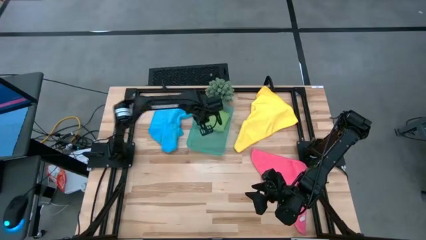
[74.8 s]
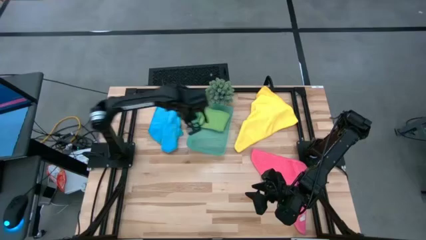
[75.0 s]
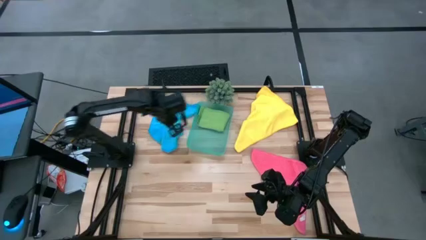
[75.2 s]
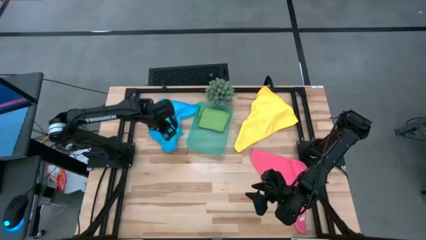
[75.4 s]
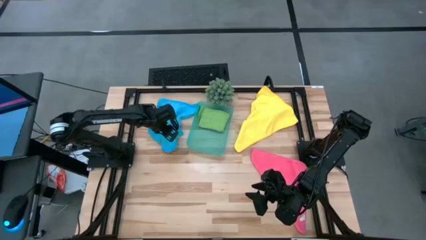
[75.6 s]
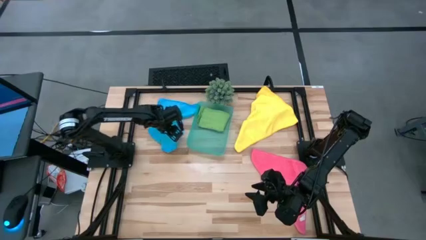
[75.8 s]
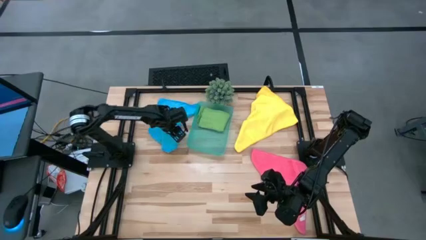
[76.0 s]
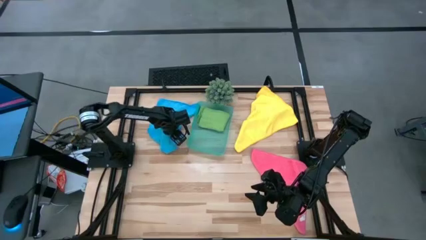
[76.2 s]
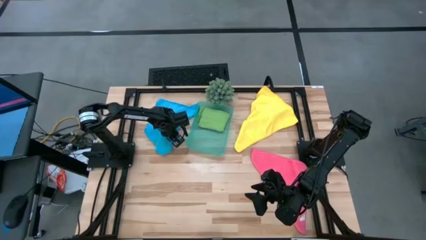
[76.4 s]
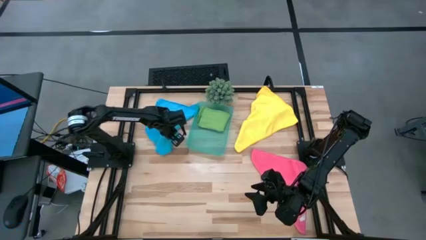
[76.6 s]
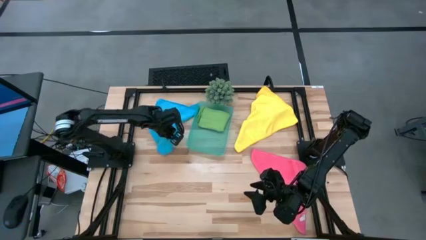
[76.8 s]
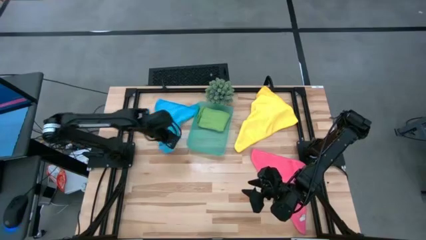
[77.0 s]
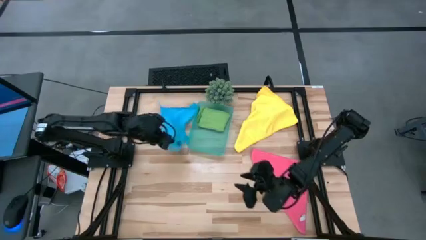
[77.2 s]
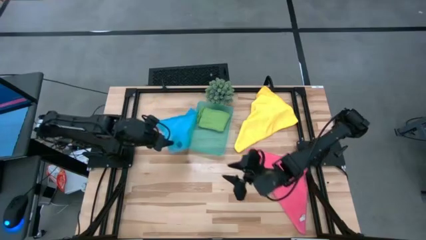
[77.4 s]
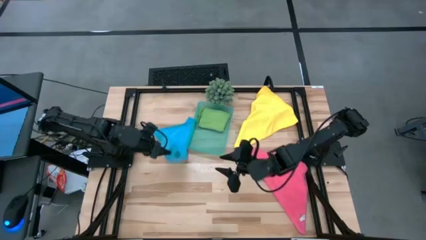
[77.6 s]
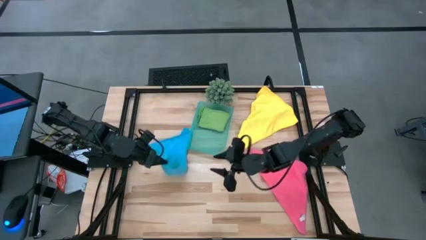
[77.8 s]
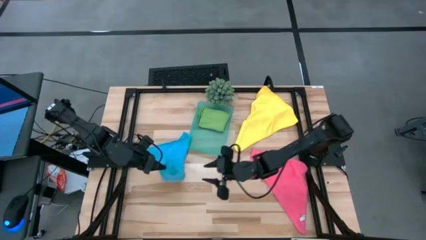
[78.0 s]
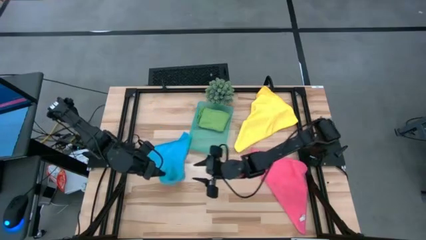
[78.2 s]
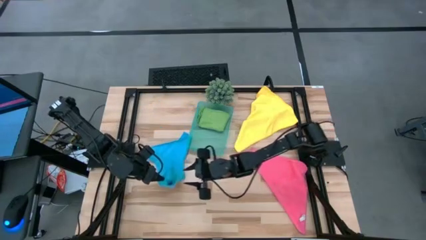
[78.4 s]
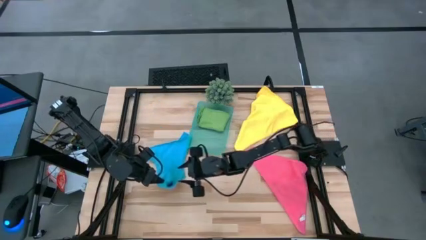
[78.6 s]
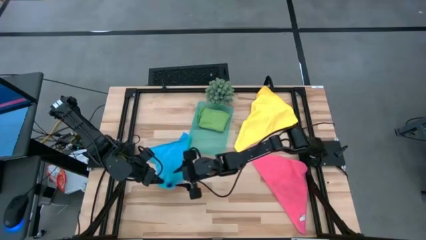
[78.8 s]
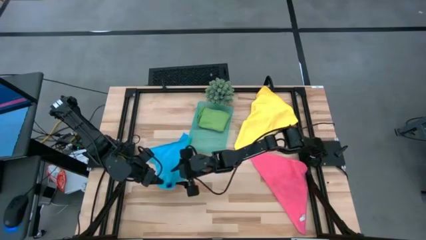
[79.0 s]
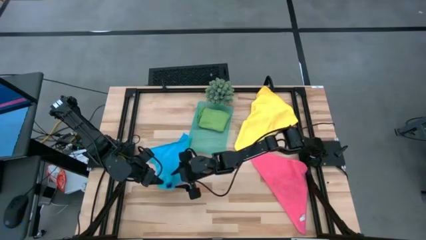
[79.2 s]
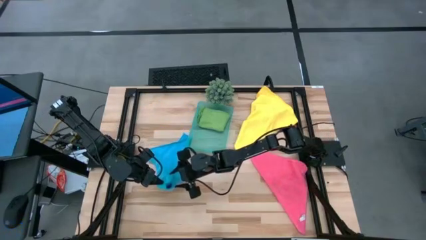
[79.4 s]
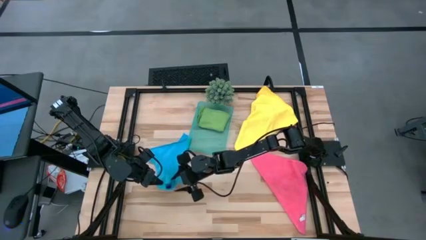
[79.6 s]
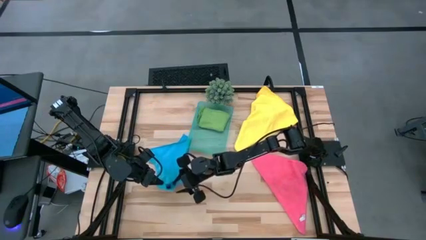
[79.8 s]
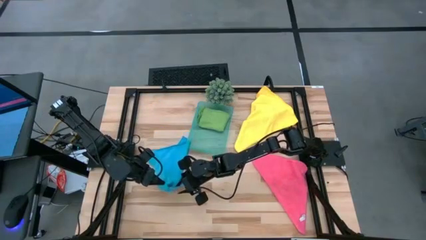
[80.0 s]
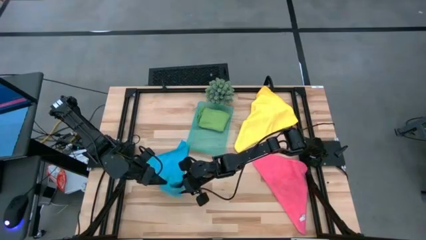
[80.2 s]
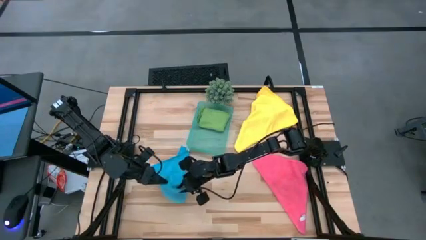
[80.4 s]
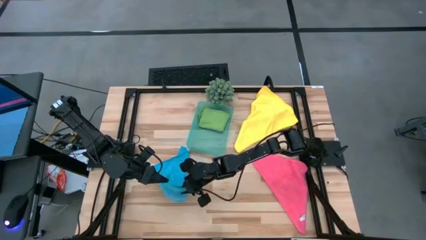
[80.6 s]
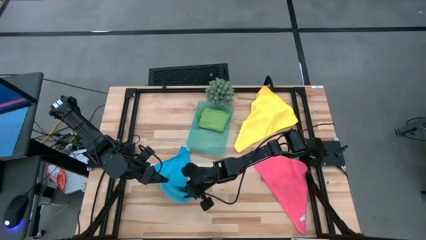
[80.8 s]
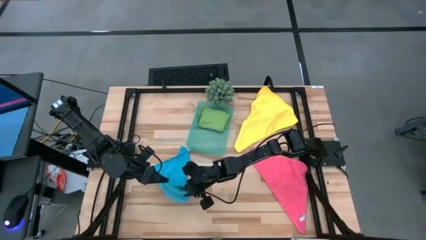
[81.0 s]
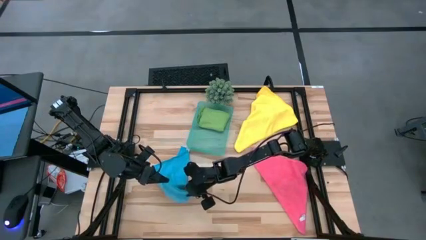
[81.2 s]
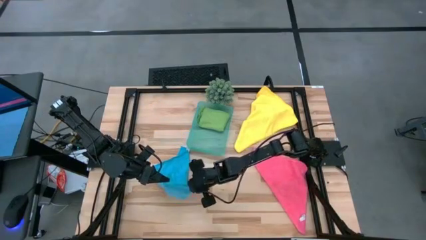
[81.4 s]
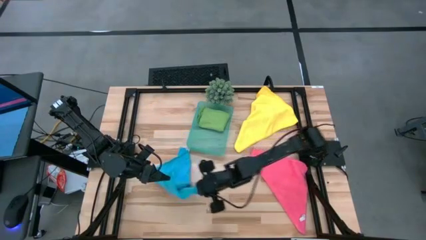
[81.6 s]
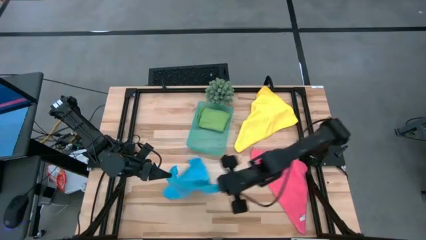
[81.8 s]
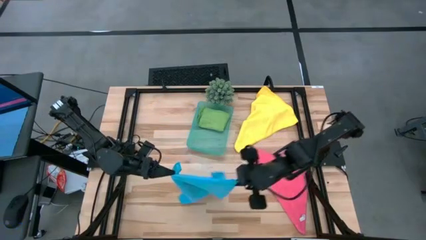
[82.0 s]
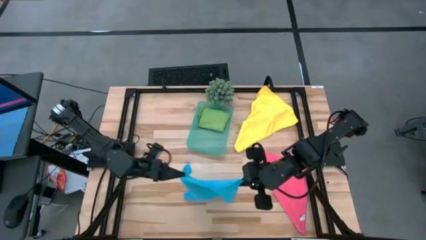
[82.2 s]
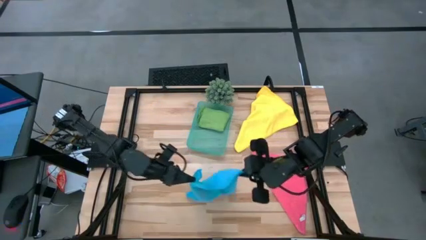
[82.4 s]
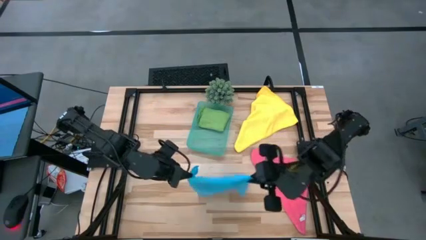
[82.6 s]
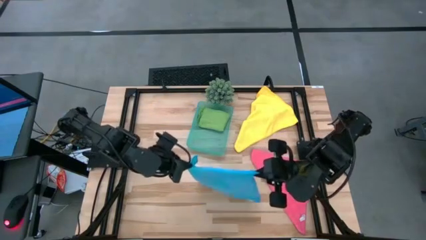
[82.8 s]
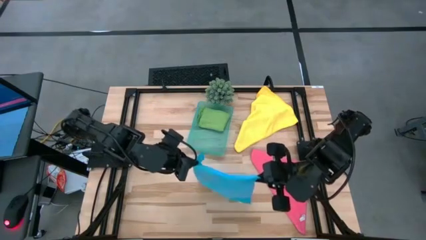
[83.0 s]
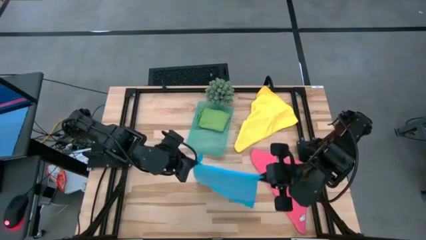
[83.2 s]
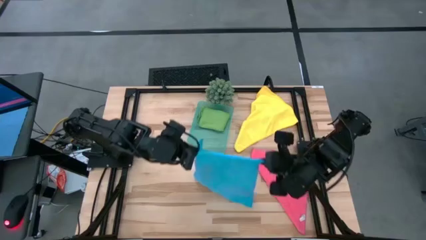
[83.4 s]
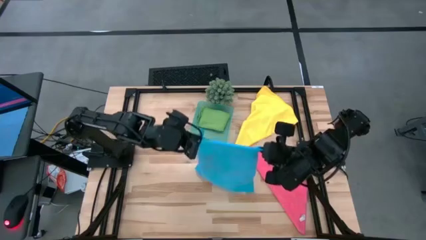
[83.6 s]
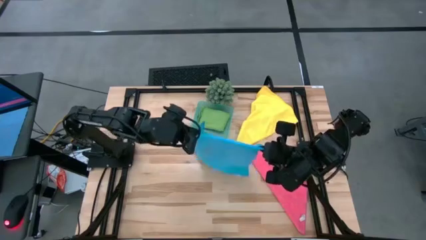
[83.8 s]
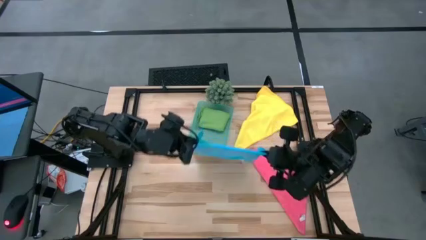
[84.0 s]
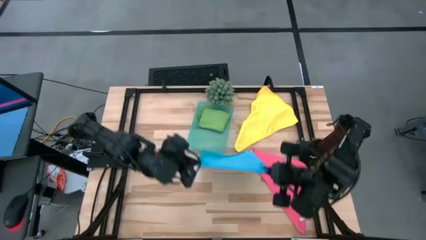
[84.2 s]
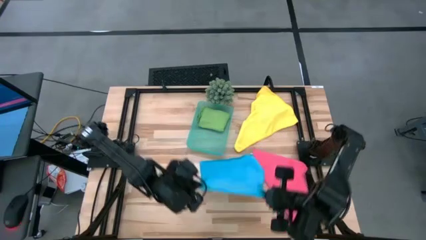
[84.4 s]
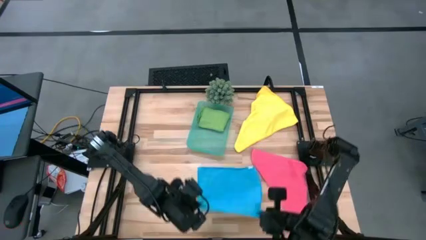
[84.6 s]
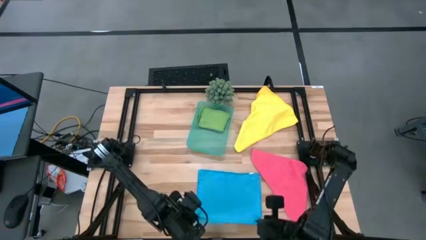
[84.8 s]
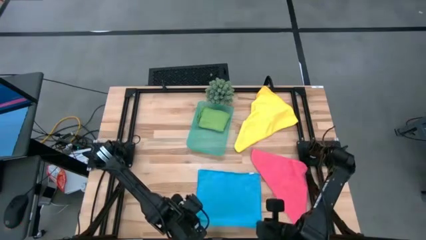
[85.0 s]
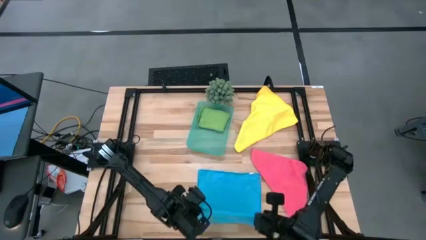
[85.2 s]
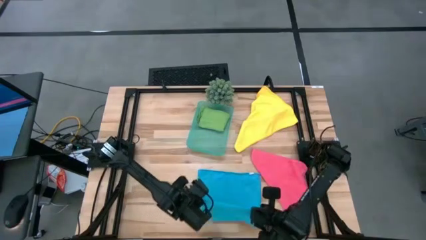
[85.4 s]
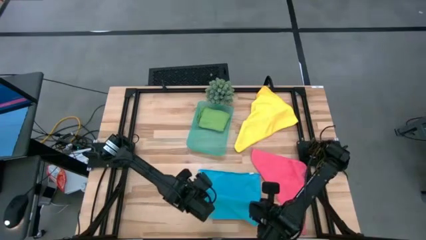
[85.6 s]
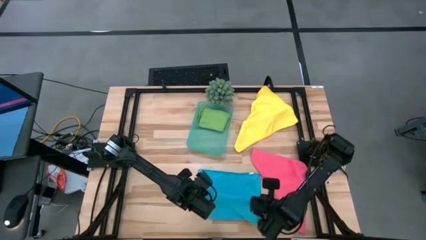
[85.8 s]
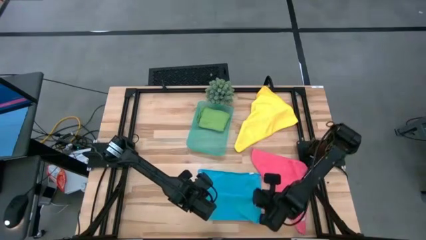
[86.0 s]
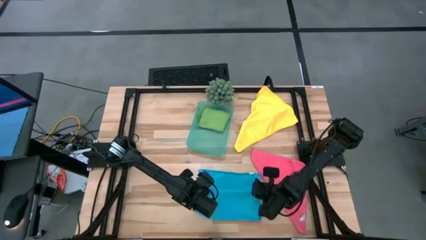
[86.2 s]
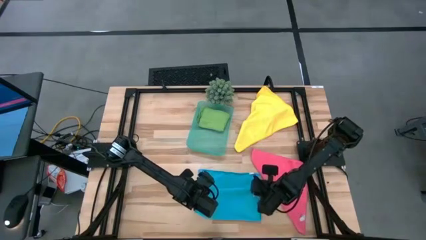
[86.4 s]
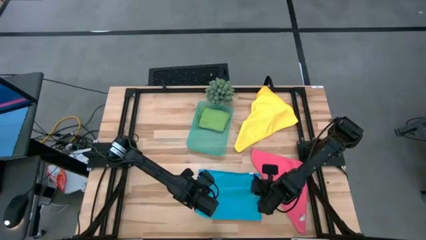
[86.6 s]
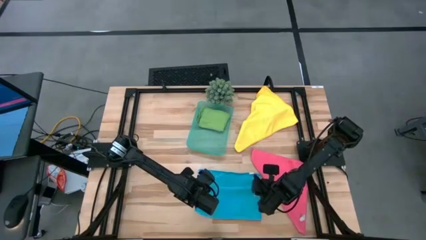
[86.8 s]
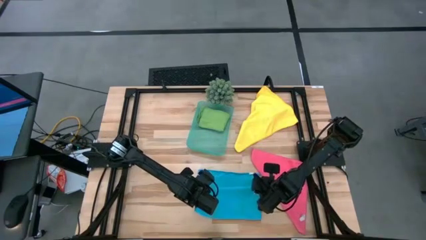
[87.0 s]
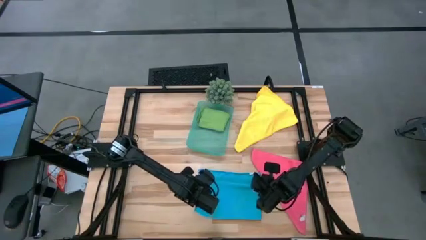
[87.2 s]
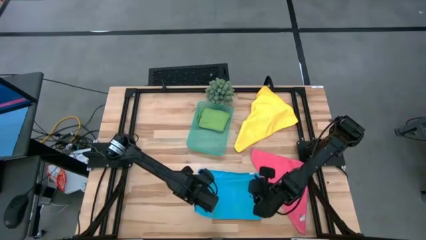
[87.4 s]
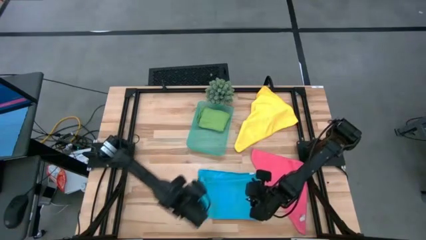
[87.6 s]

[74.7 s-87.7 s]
Task: Fold microfiber towels
Fold the blue micro fiber cloth

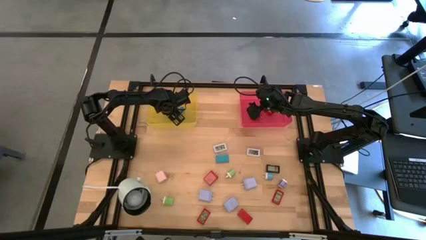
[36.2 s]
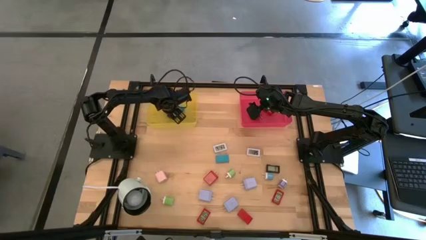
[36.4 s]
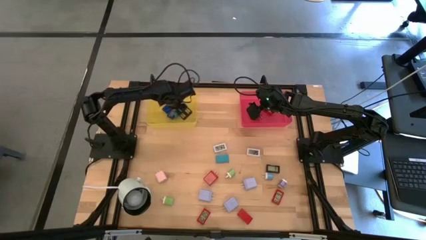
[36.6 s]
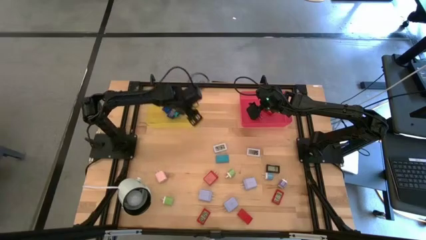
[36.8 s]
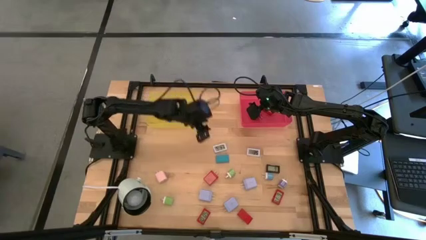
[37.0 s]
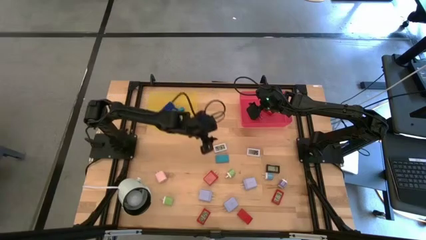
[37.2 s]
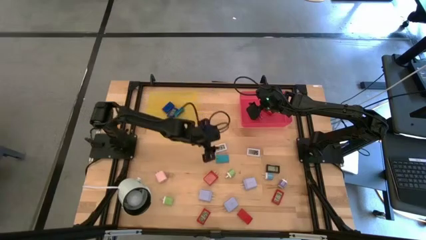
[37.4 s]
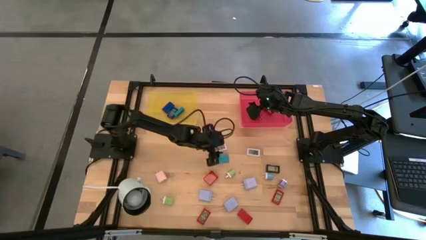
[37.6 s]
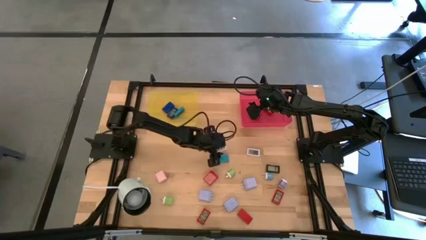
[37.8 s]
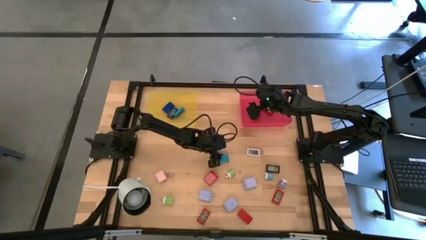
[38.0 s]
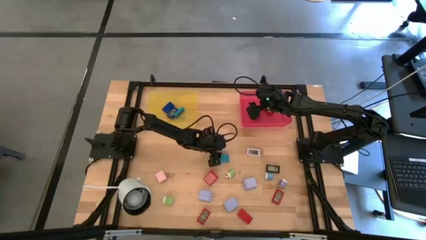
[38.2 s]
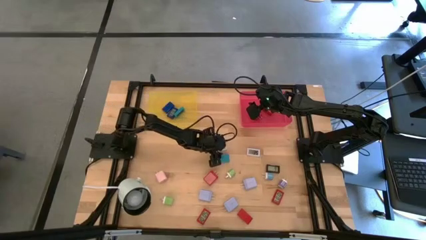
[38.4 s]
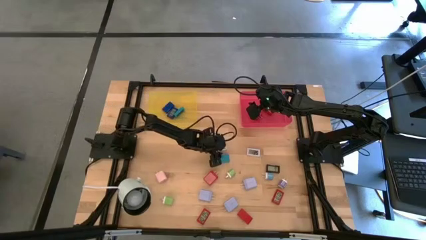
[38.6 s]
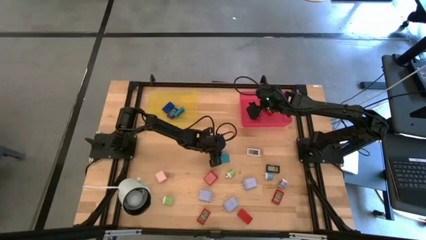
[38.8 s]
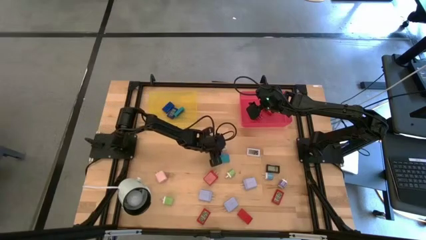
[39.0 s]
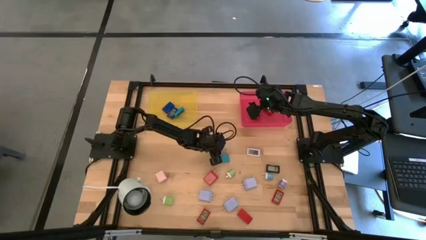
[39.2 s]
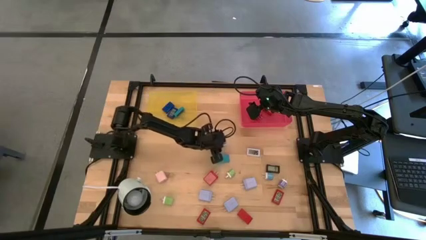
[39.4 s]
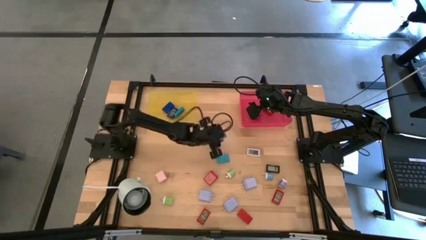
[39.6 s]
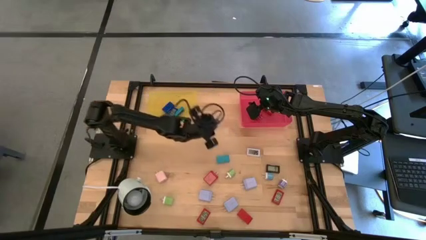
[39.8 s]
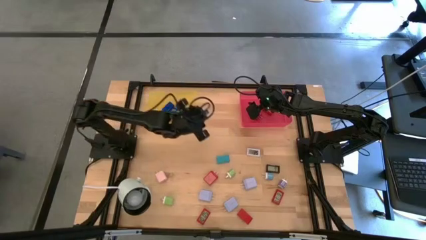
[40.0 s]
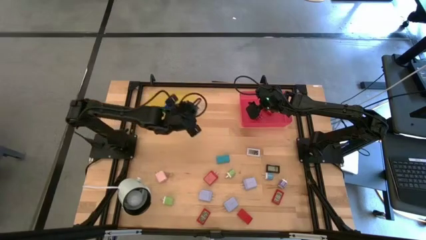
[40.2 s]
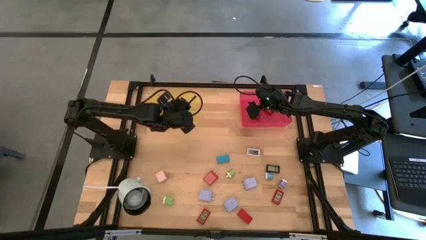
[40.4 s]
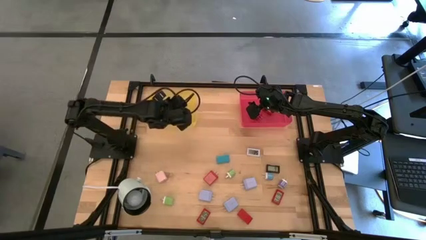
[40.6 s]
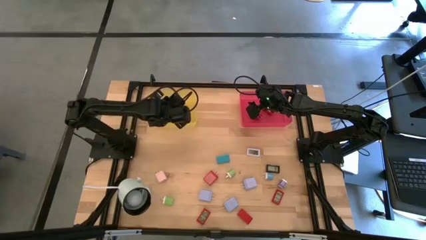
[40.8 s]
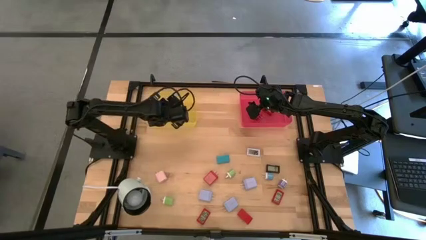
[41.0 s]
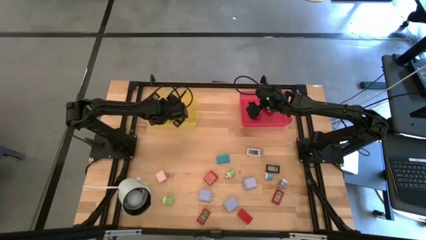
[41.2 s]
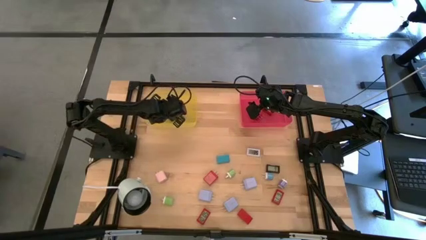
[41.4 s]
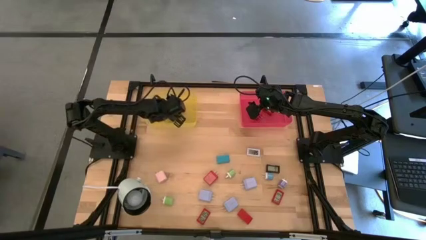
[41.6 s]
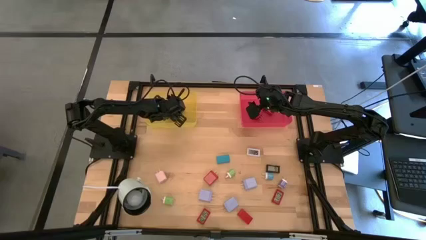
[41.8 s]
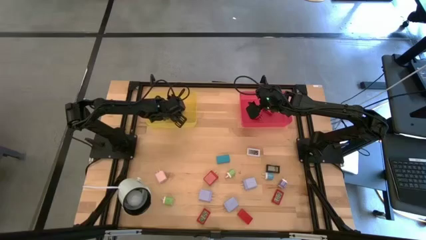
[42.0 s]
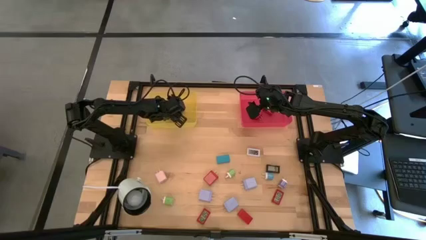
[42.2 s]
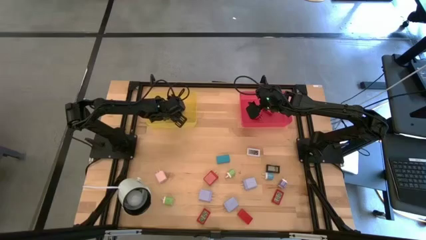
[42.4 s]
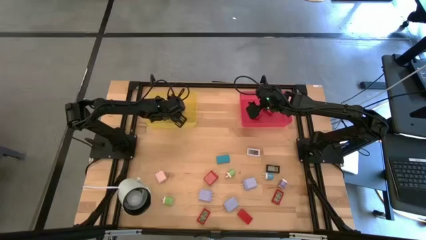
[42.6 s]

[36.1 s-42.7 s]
Task: Pick & Place Office items
Put the left white digital clock into the yellow bin
